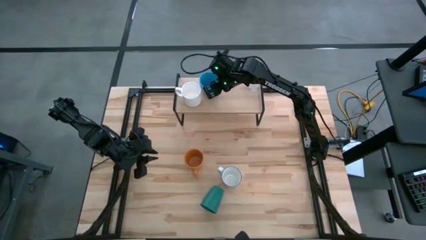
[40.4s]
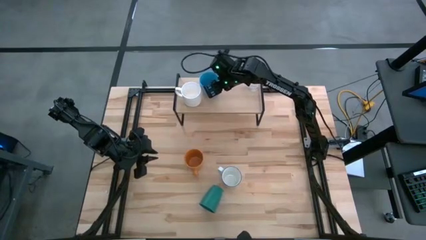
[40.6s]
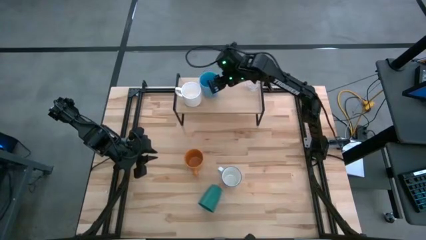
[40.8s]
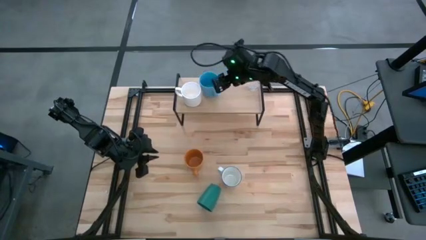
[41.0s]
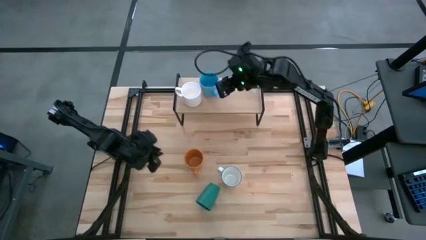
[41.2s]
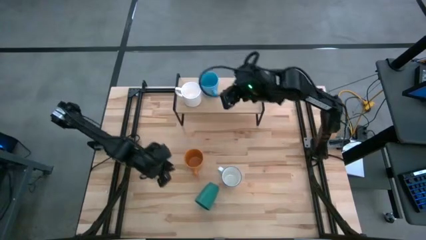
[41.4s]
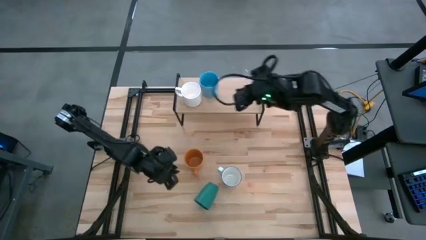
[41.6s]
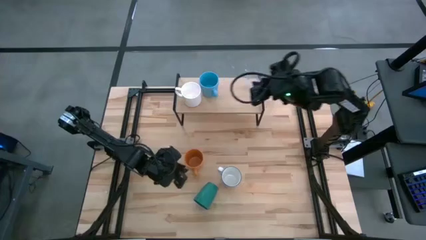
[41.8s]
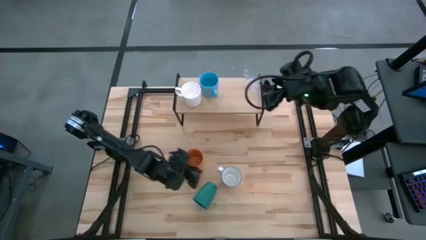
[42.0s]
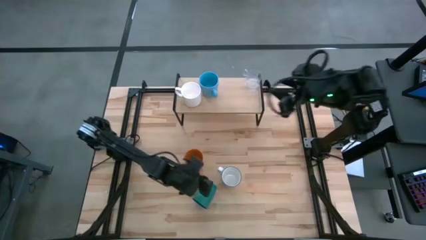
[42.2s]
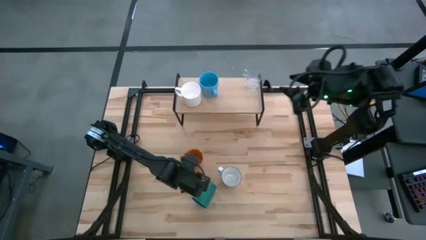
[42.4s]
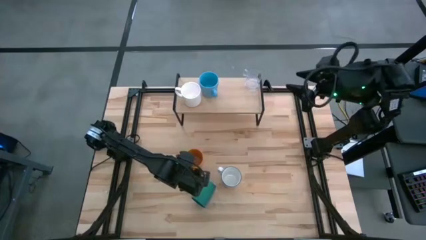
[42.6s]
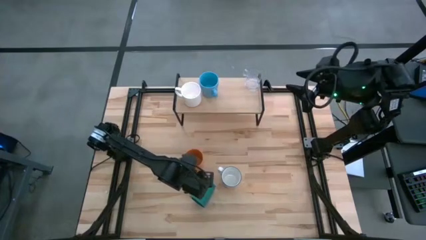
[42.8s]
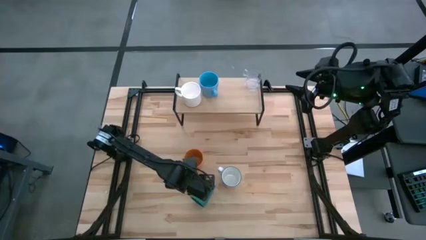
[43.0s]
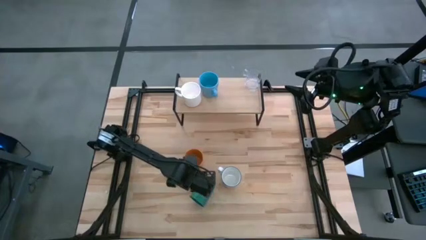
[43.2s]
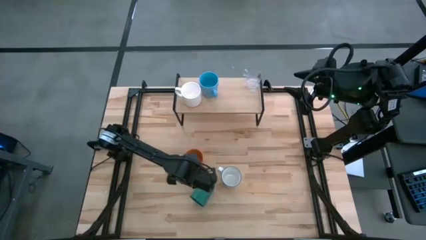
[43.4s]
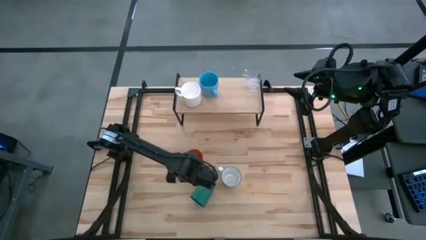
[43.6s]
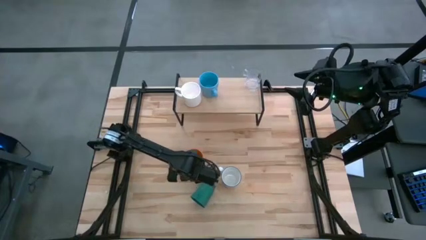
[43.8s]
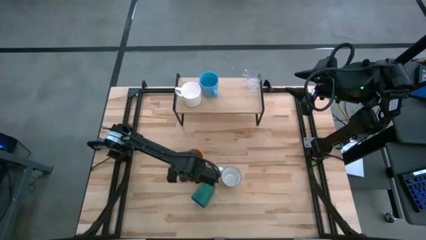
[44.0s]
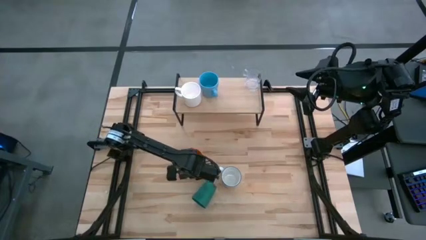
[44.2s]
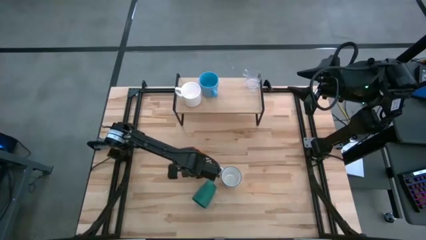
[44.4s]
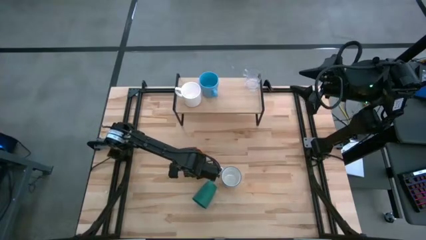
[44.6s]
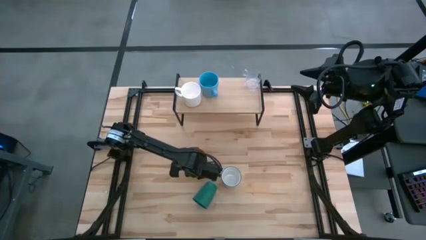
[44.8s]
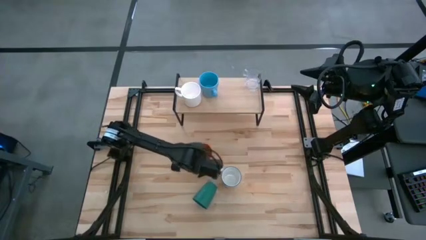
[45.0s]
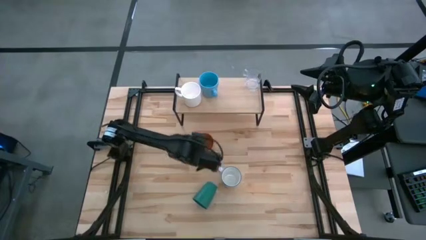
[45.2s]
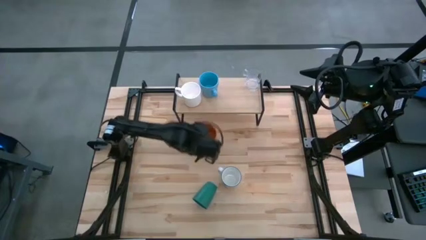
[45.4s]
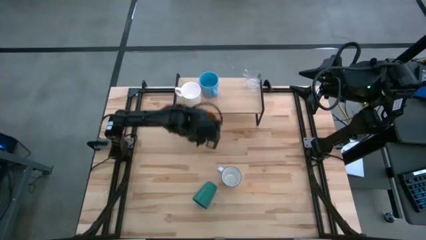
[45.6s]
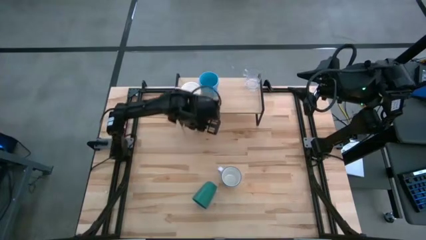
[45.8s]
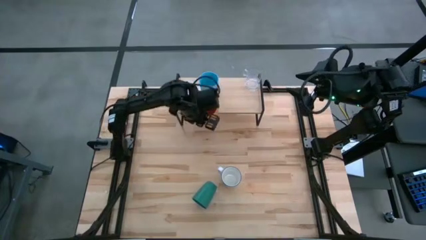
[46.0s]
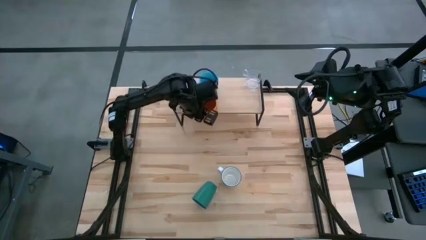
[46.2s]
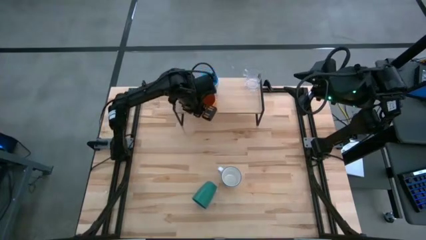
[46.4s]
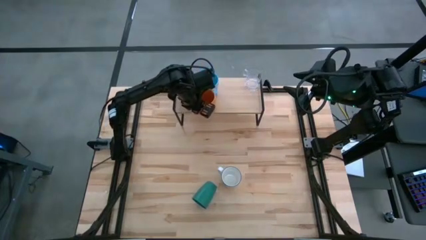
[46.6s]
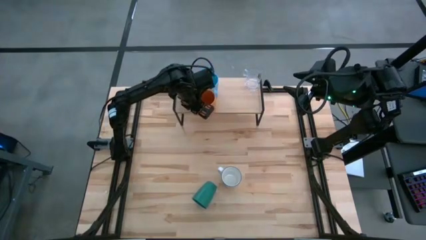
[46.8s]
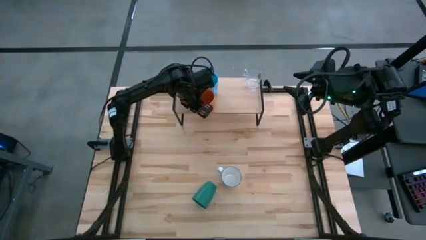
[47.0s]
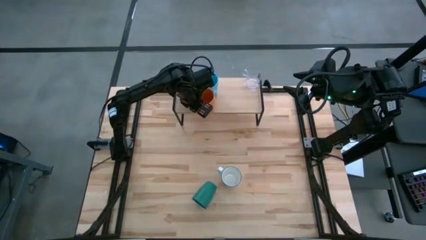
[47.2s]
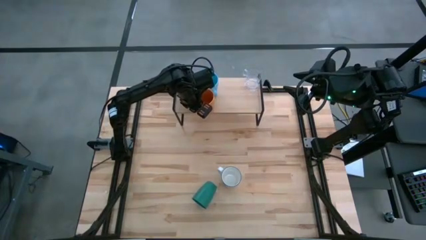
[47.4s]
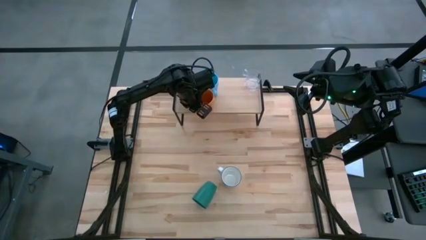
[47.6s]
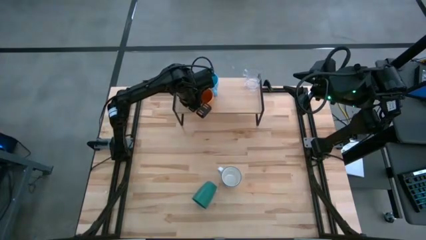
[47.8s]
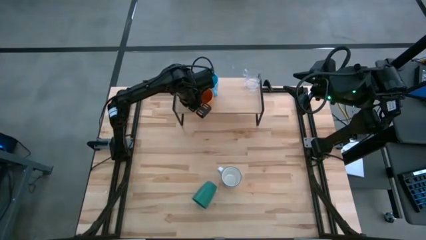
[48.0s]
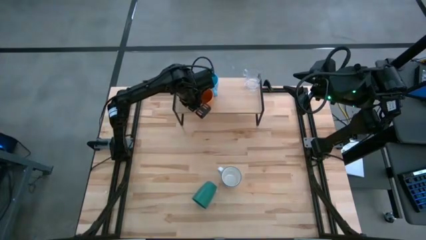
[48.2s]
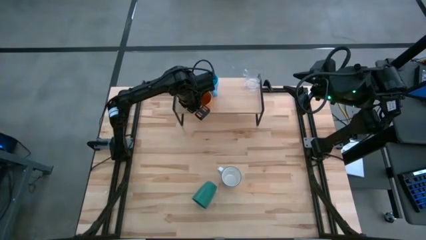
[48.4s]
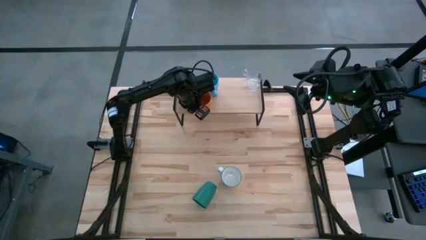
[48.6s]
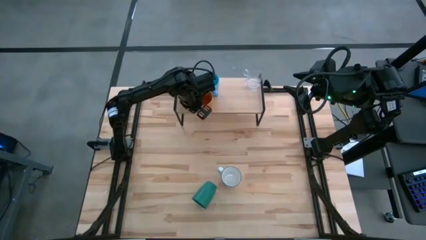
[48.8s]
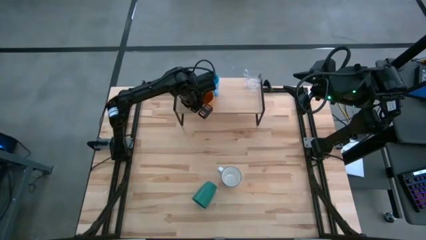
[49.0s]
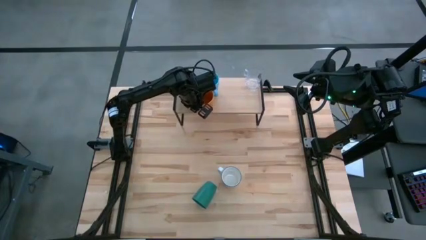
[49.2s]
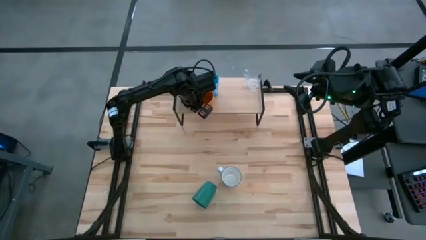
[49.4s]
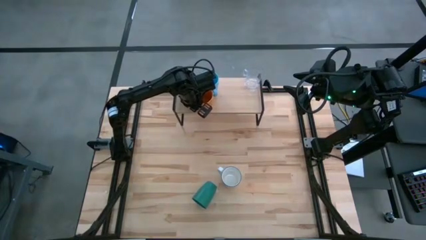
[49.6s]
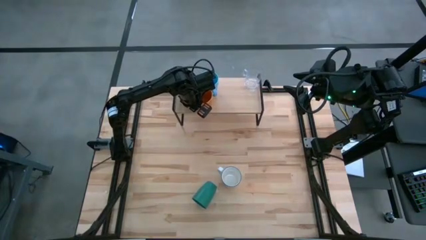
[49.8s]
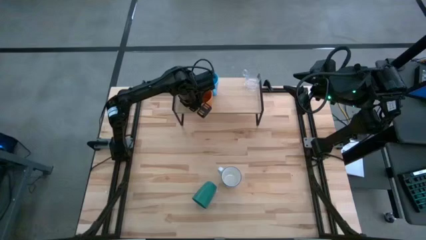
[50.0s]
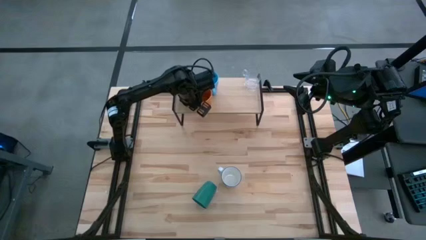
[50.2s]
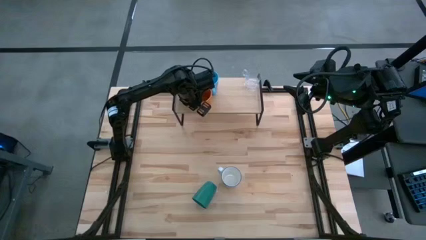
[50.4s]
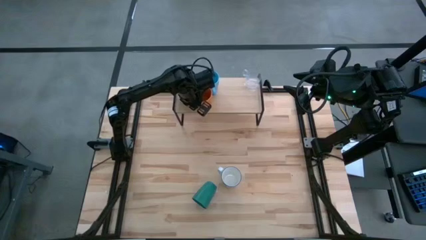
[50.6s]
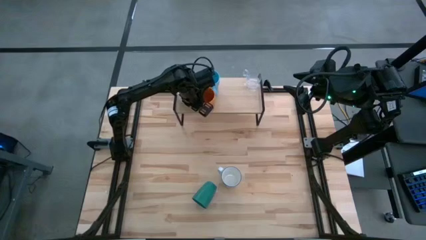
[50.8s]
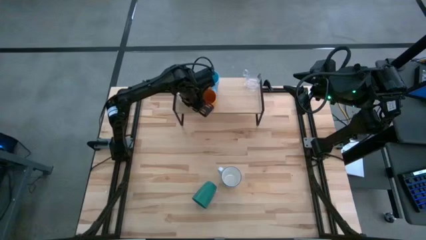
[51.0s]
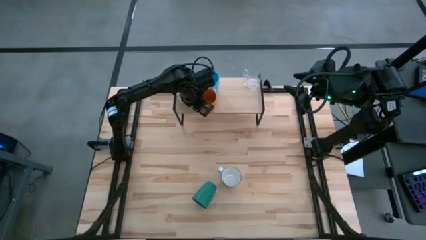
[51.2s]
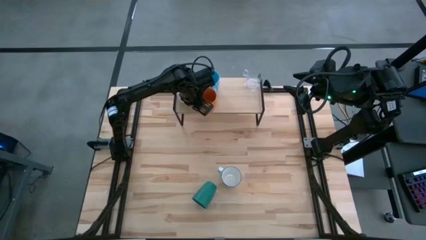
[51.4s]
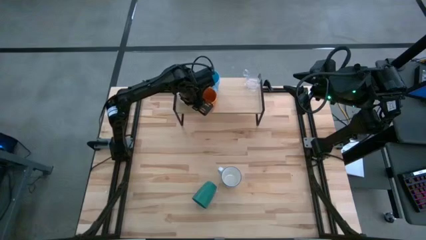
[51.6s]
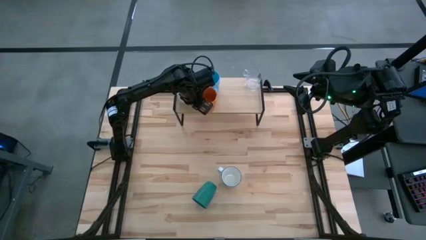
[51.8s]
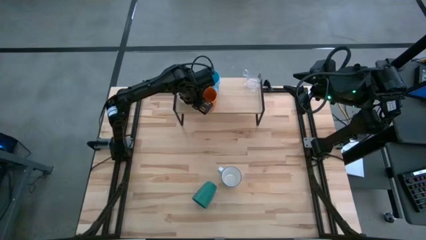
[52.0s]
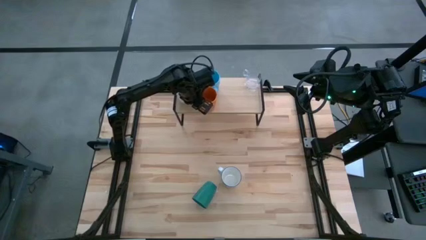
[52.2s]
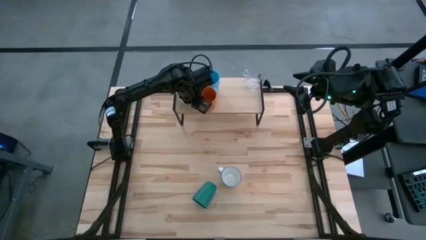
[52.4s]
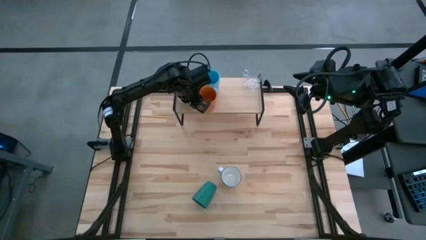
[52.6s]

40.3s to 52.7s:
Task: Stack small to large cups/mugs on shelf
Put the orange mug on the shelf

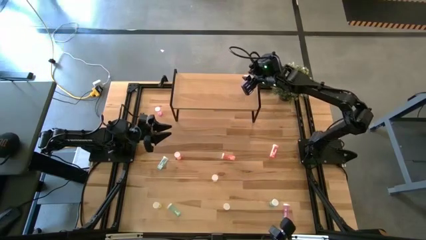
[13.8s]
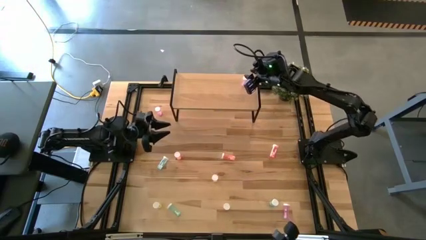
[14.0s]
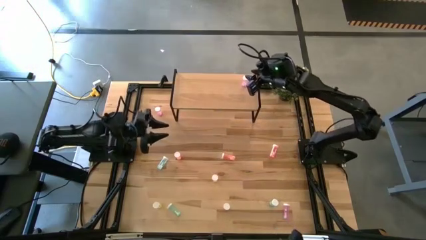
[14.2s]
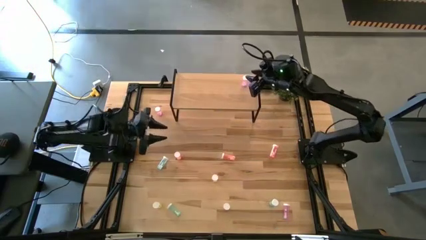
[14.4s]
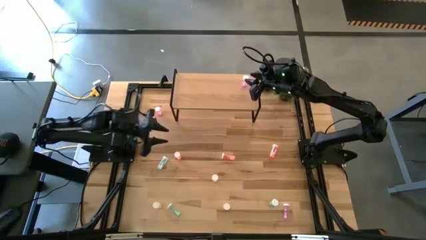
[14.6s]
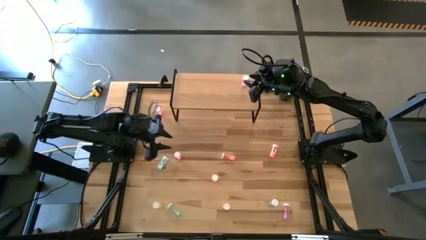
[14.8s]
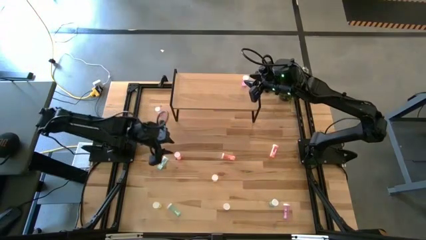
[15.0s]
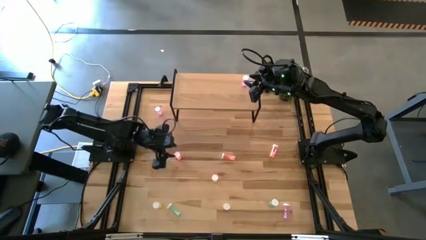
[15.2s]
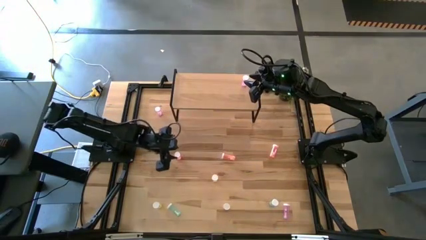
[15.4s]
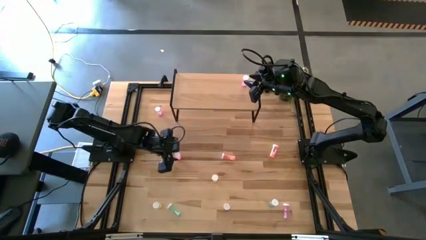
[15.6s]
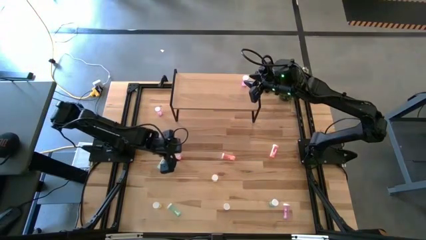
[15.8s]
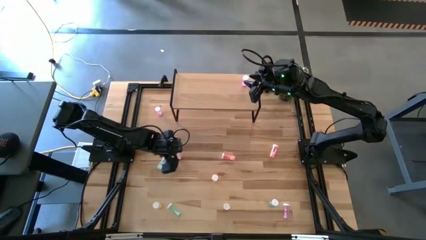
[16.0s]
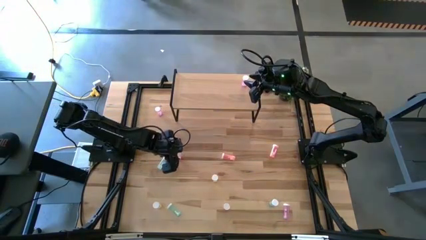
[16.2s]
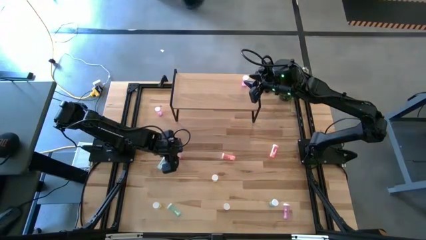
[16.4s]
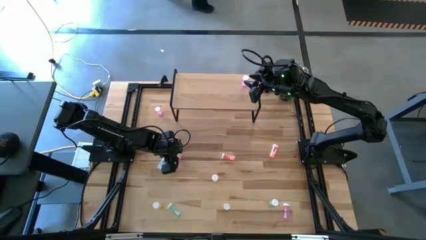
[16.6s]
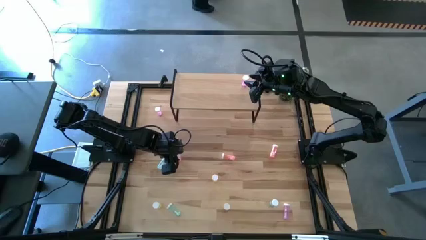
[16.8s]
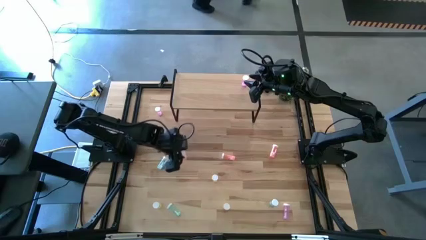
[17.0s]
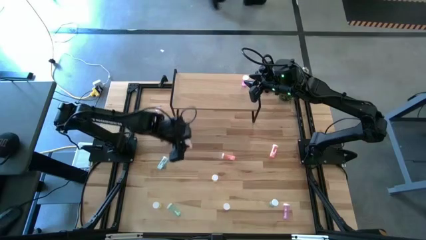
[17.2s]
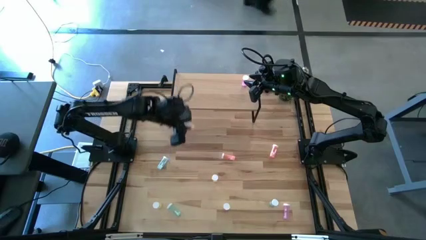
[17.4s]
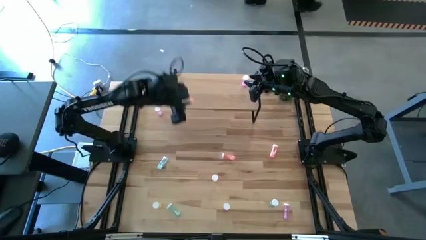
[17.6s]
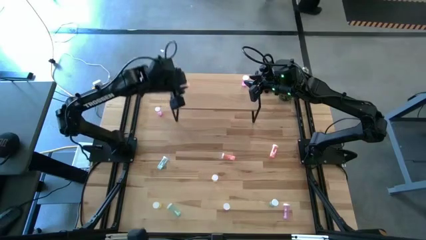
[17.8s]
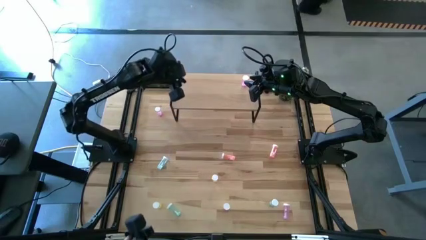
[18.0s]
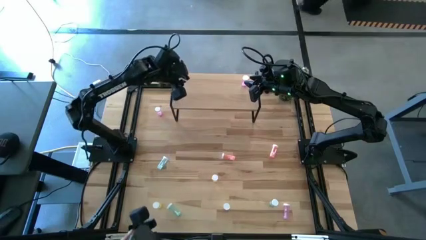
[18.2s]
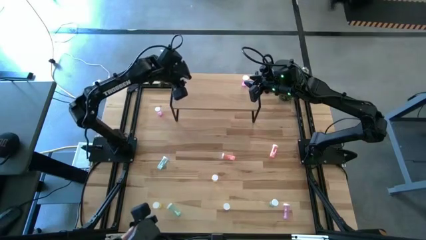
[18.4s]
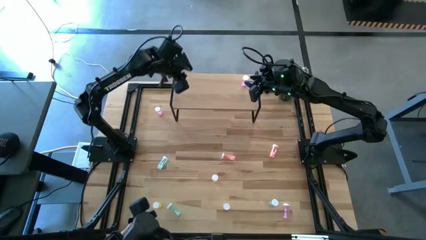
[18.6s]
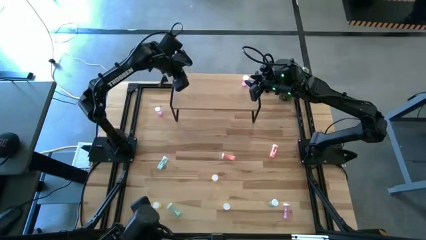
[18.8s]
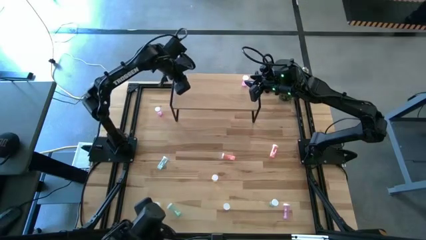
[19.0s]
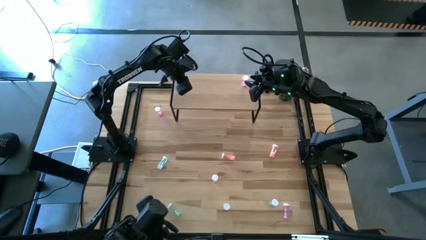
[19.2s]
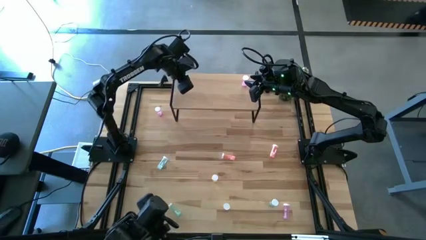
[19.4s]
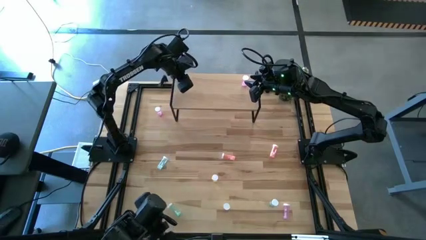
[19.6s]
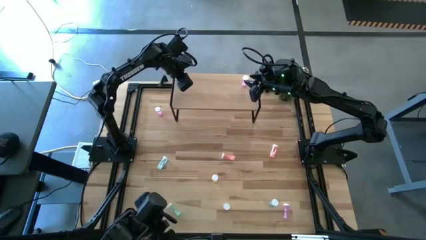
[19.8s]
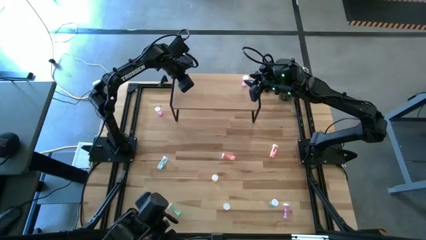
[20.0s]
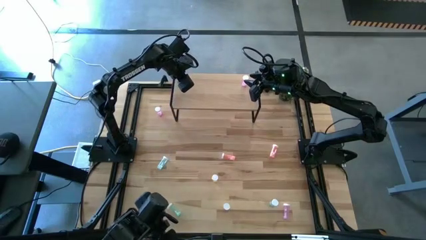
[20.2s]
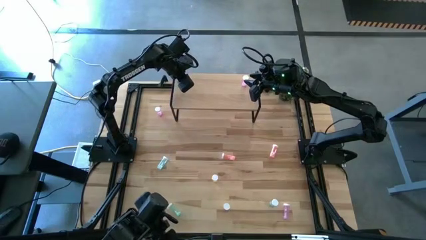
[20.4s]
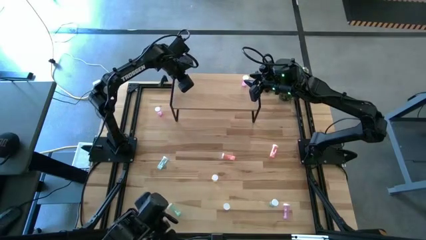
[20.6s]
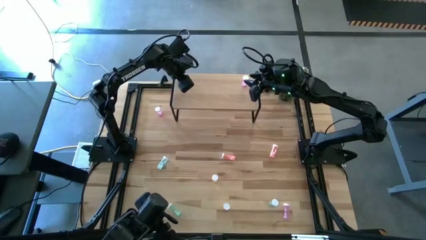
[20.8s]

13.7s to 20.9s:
Task: Pick and place medicine bottles onto shelf by color
Put the left orange pill bottle on the shelf
